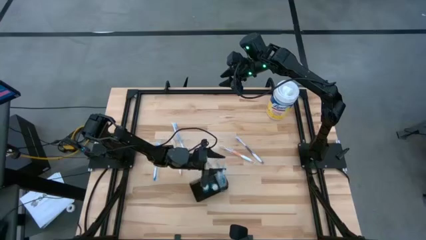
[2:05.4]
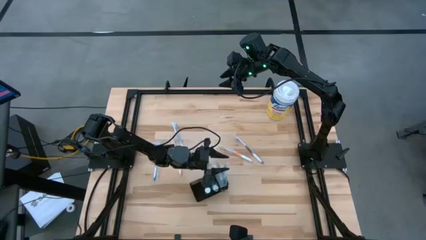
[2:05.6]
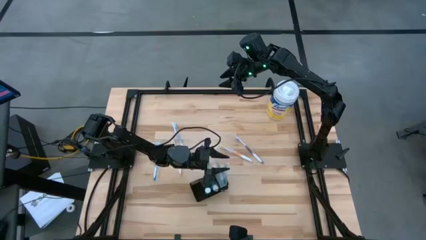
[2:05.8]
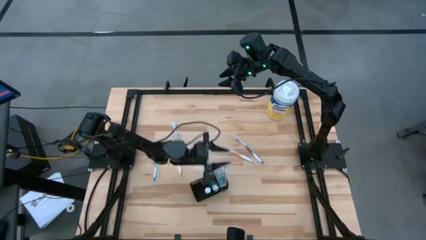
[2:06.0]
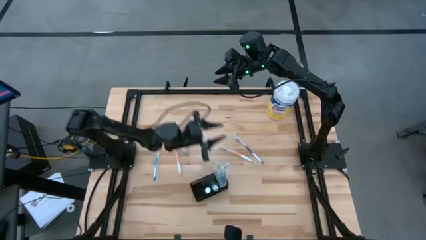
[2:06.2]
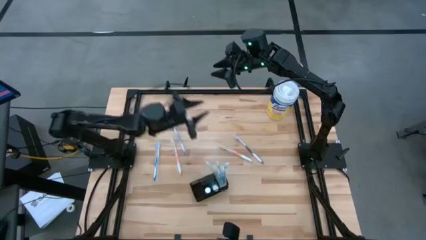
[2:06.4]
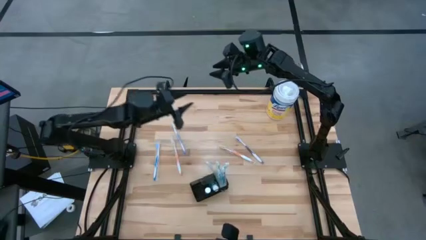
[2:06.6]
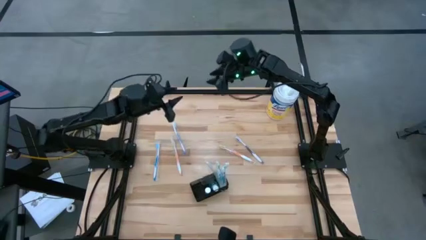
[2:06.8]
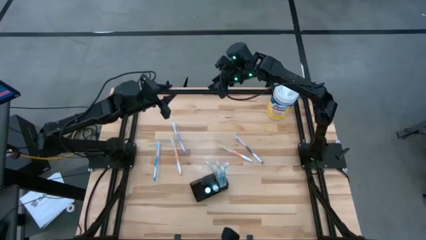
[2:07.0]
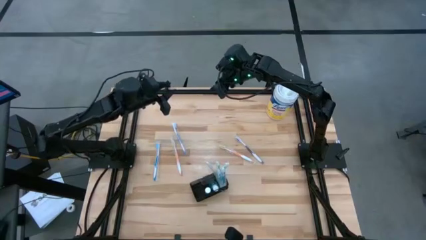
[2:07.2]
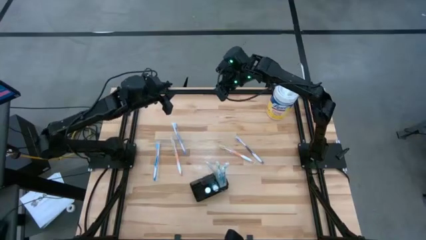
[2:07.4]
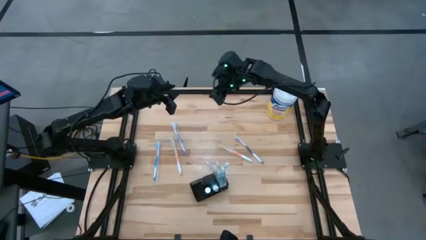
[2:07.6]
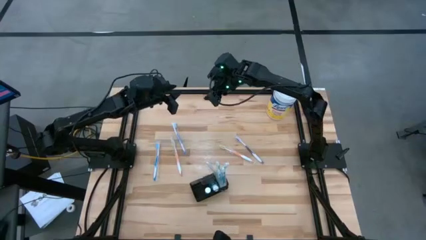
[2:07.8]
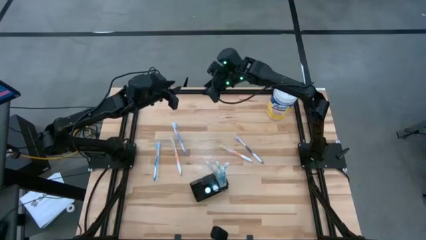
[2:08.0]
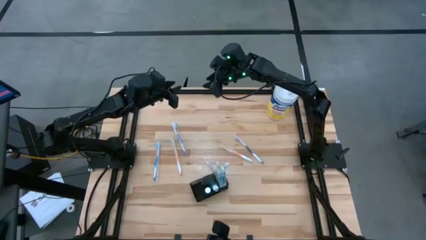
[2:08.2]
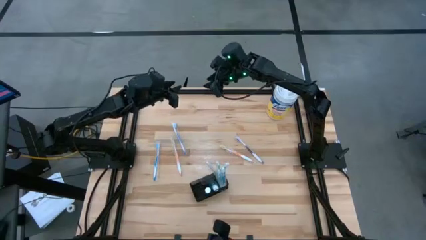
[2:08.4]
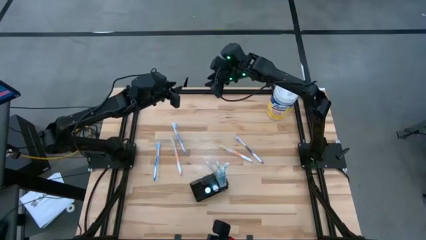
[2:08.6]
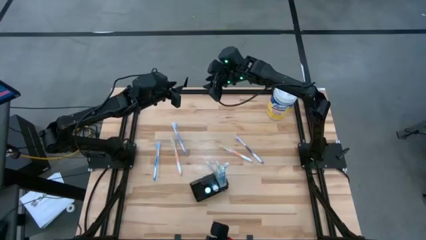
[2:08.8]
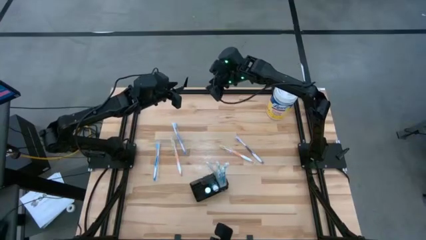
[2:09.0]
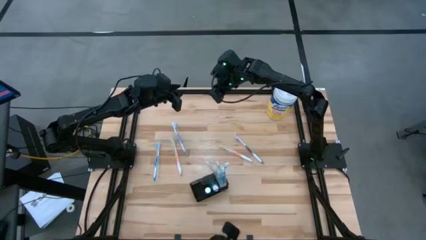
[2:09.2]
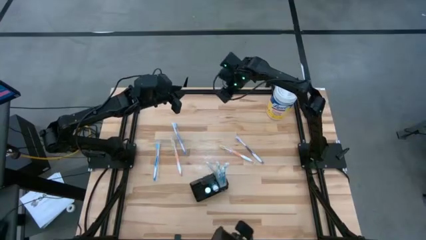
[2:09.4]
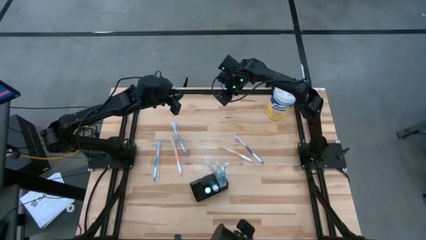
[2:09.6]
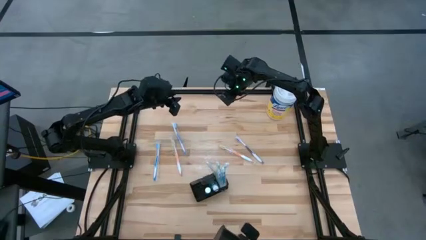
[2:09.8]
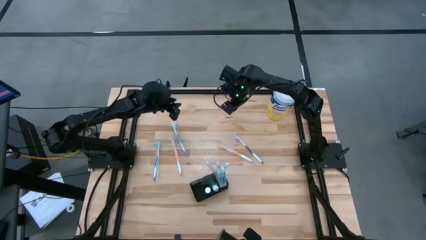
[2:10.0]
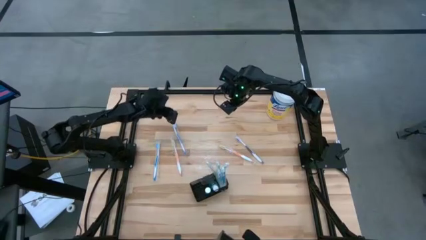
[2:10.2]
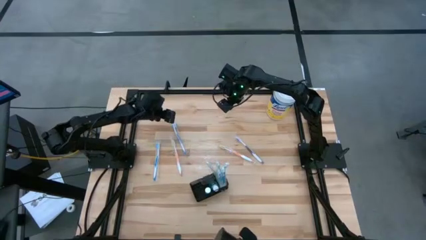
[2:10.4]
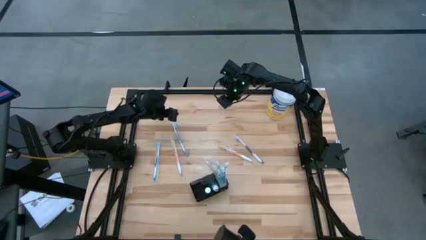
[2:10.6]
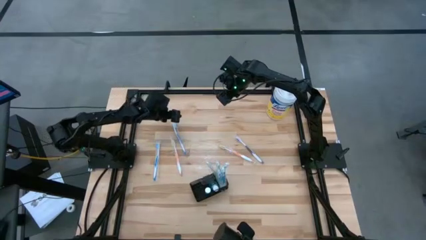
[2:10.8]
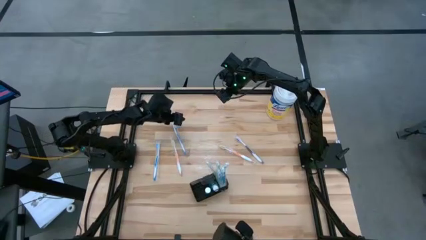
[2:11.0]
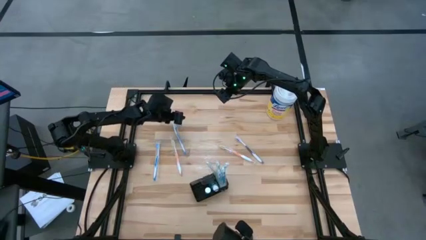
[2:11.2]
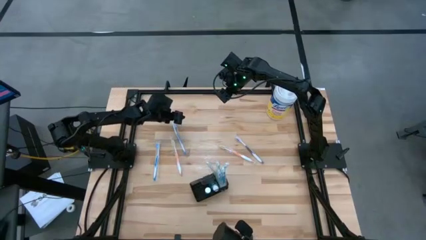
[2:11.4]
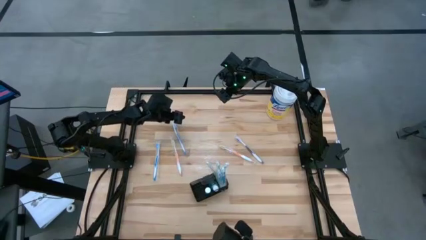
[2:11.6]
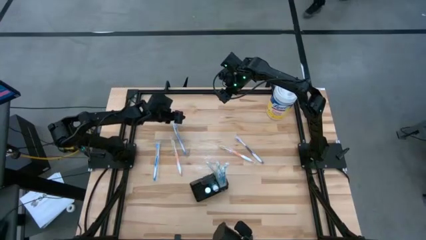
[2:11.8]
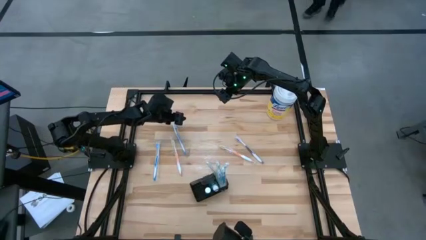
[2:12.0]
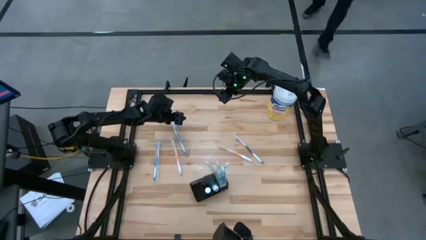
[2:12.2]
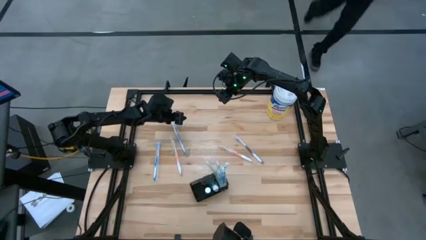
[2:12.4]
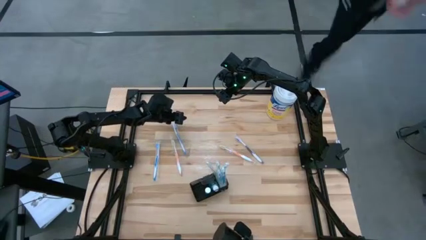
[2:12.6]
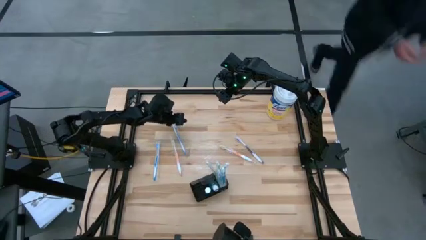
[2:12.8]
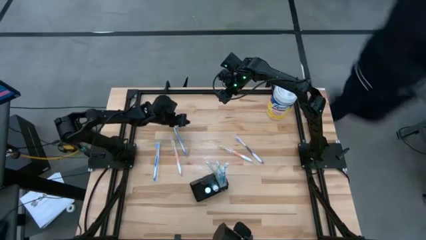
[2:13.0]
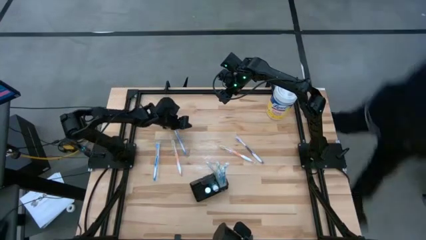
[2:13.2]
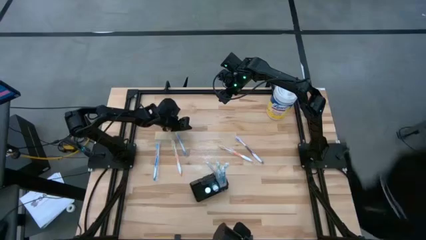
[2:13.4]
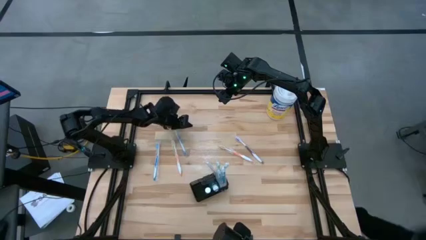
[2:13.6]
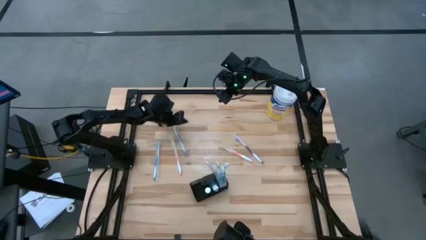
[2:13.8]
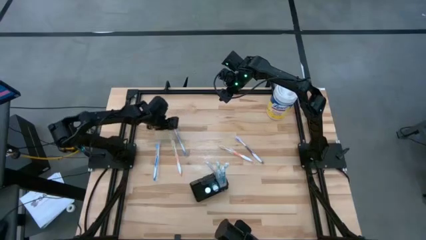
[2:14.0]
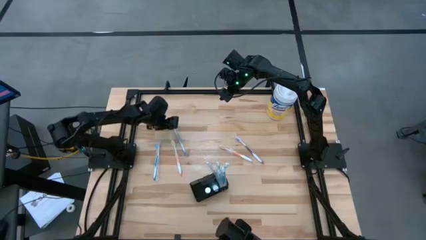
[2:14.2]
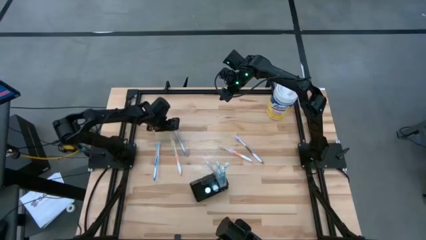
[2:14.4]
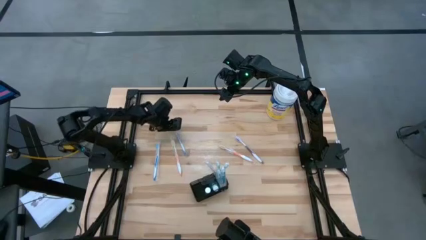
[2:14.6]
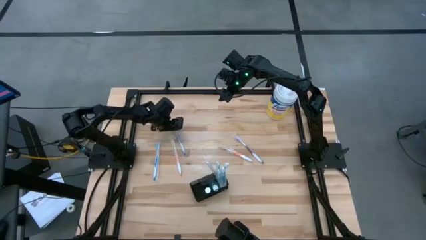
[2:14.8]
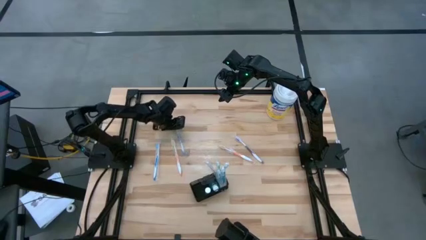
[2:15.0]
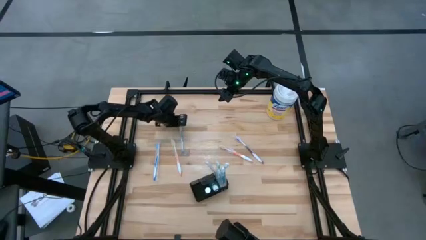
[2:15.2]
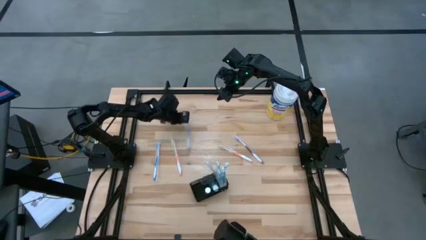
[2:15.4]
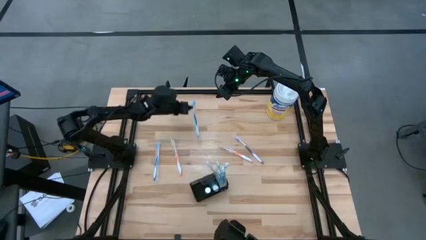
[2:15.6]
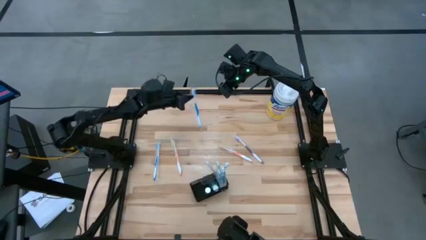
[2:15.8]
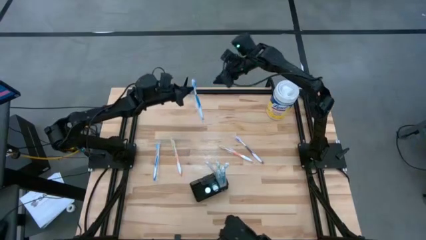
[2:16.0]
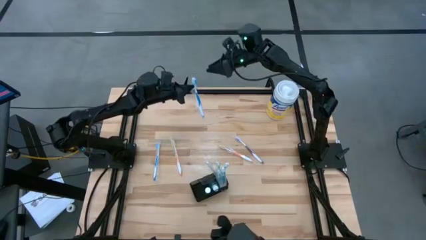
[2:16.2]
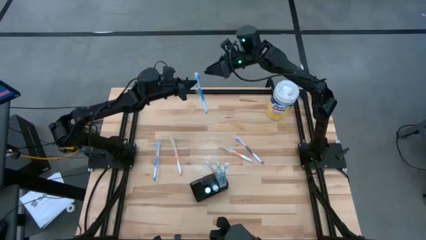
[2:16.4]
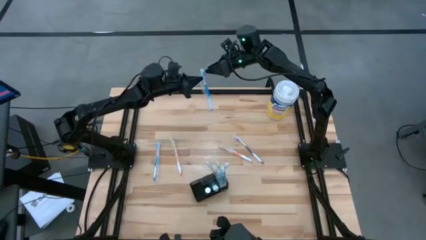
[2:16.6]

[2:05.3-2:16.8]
Task: Pick & Place toothbrushing station
Put the blue toothbrush into the mesh organizer

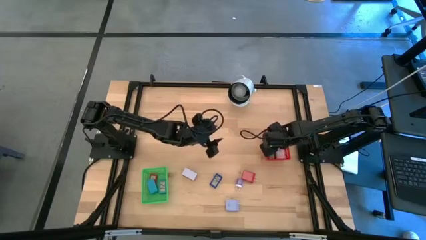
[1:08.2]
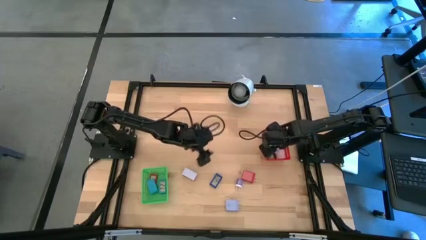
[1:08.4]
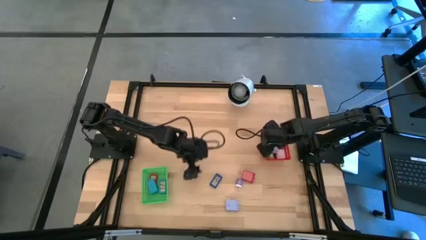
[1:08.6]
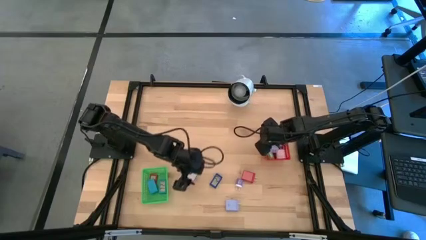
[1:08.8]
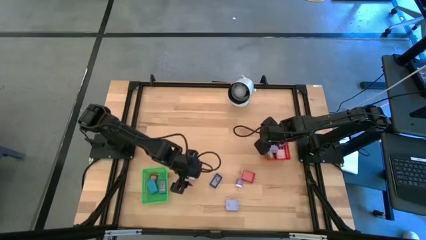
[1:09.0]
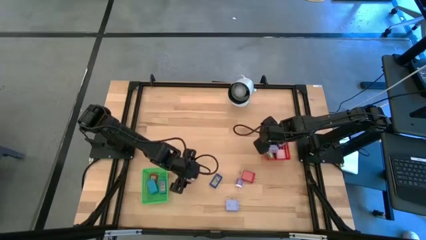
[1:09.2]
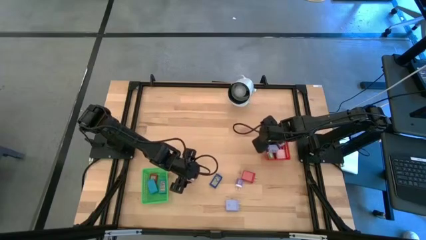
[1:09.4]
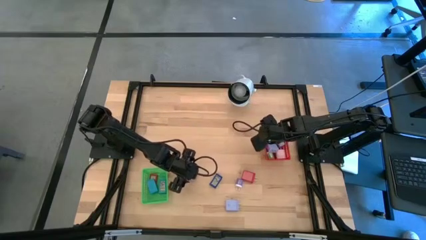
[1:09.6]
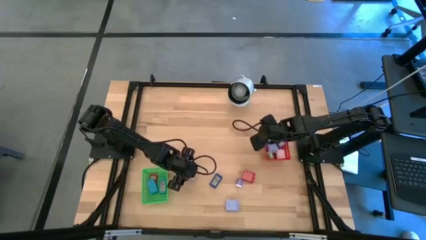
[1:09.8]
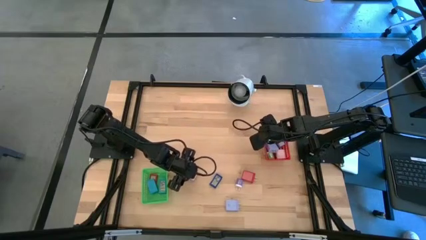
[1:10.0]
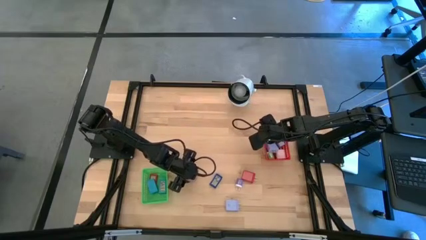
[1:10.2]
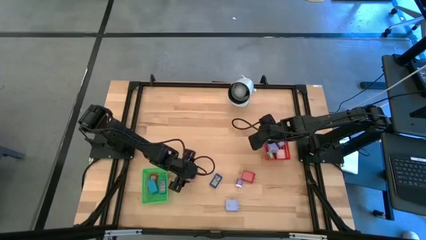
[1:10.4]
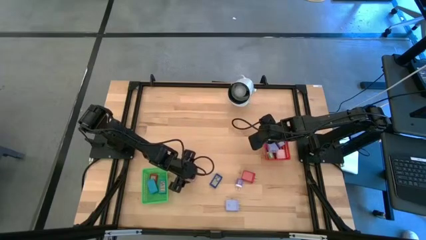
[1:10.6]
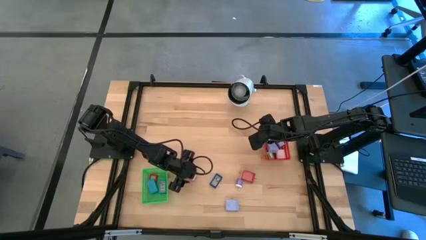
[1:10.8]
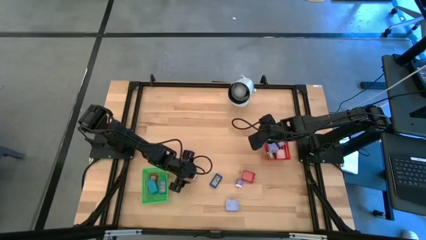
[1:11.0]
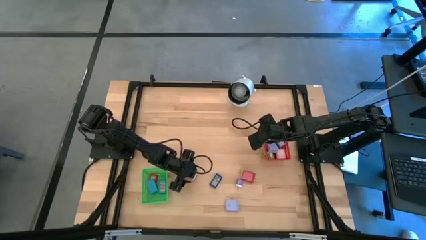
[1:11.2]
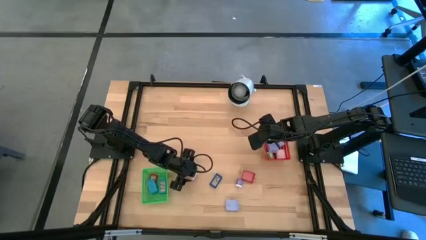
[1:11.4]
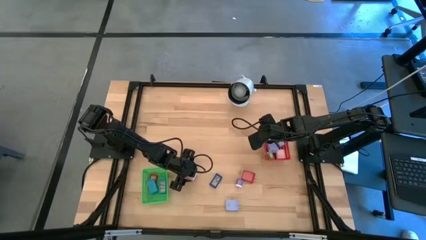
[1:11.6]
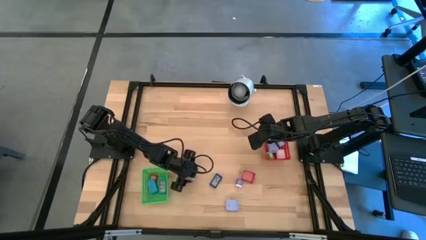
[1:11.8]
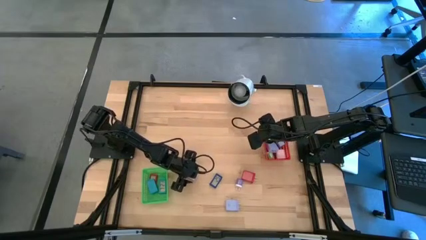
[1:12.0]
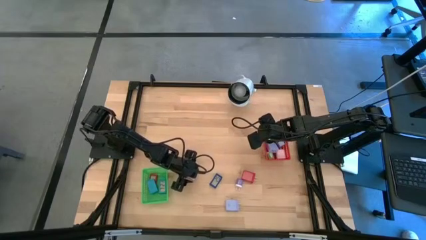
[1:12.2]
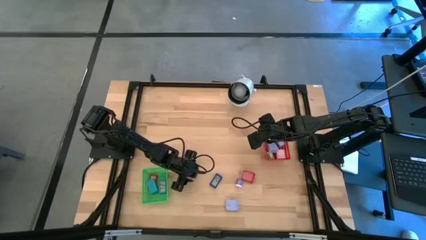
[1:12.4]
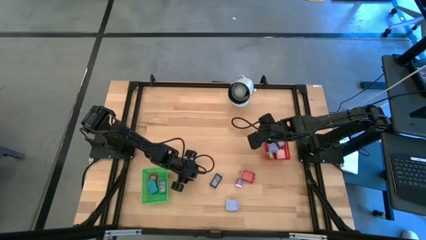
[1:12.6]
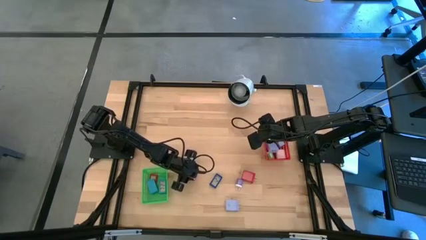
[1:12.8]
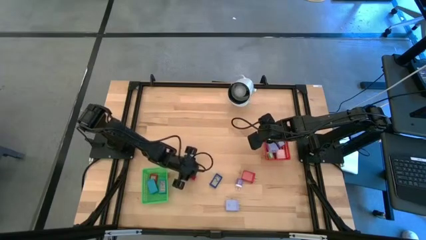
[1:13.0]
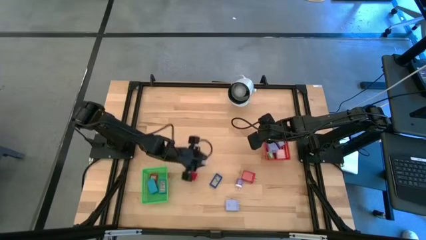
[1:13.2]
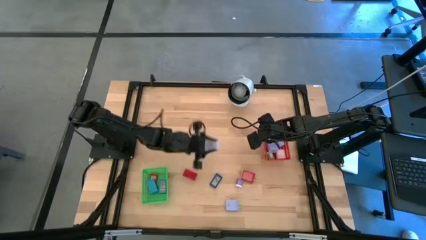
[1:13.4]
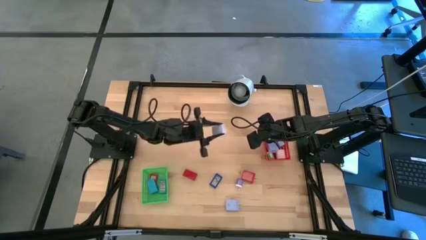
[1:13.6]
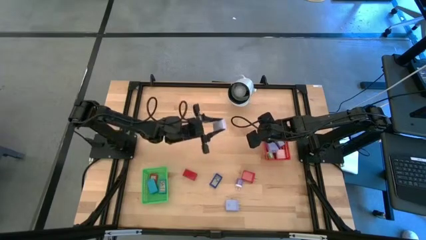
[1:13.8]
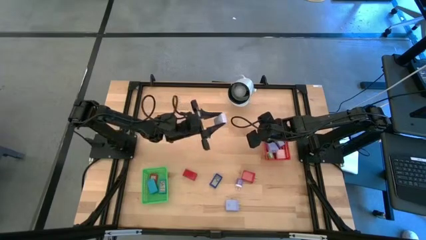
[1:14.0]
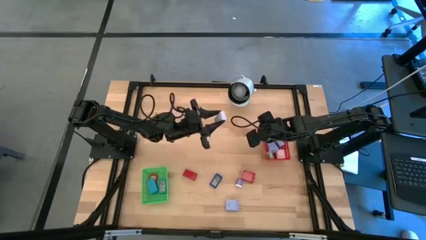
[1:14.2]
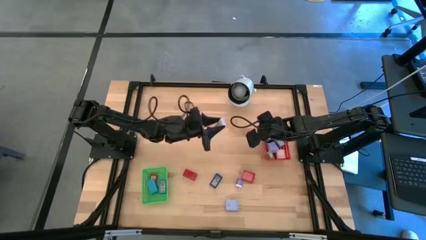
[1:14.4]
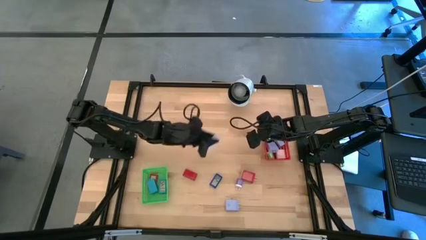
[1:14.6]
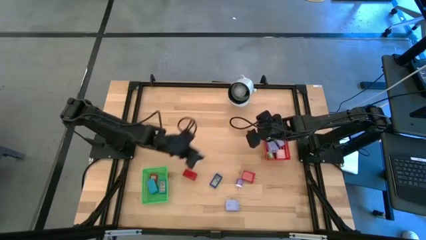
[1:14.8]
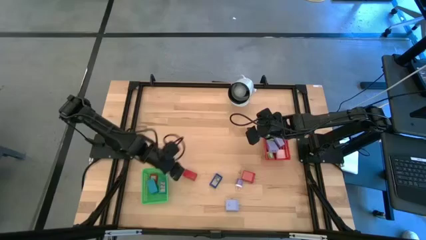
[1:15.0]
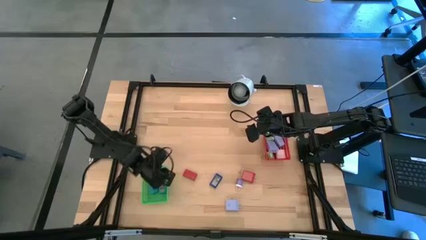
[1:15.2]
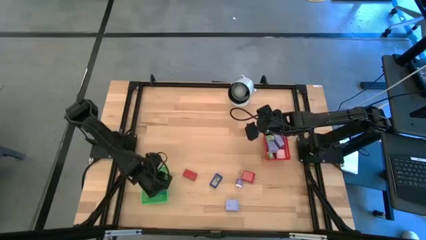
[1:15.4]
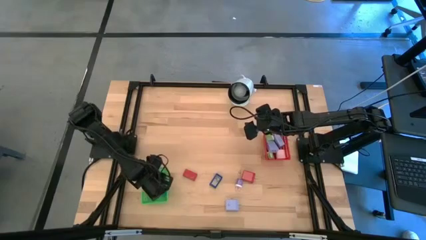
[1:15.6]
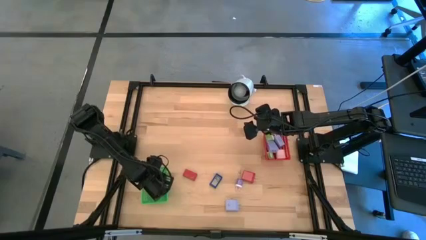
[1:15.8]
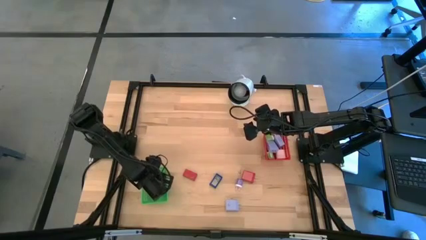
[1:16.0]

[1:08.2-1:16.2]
Task: Pick & Place Office items
Put the white digital clock into the green bin
